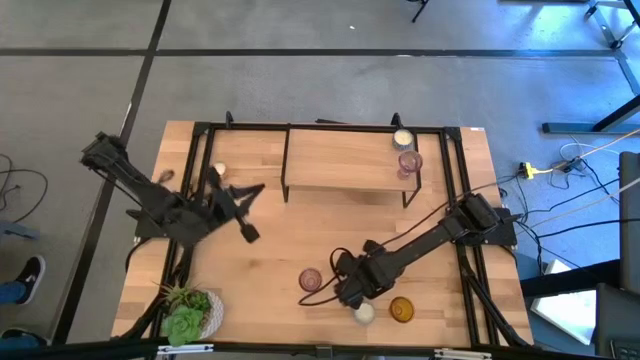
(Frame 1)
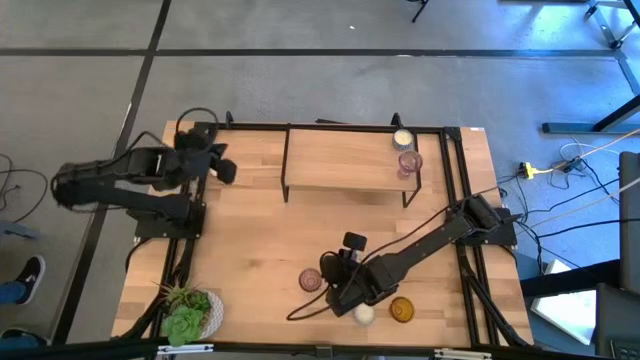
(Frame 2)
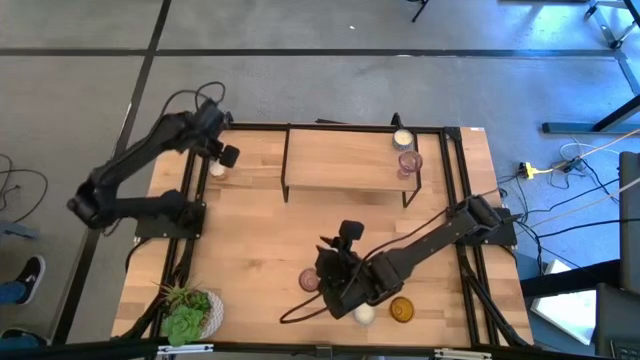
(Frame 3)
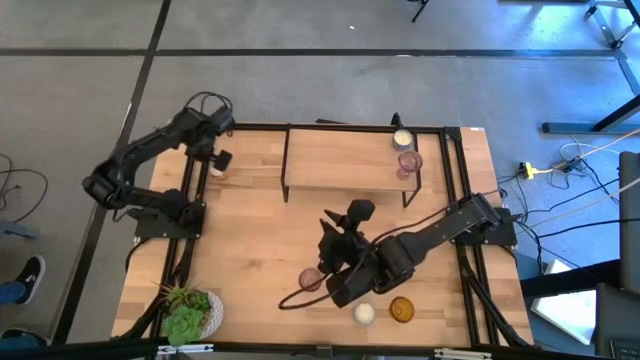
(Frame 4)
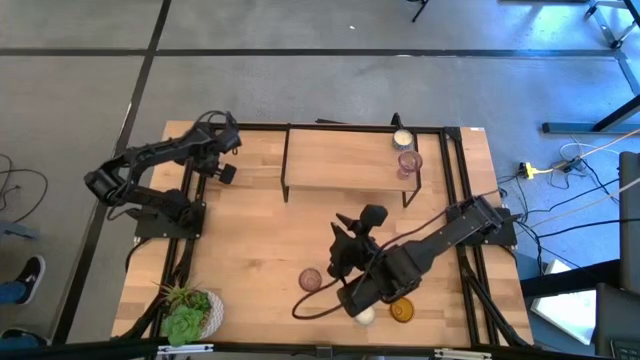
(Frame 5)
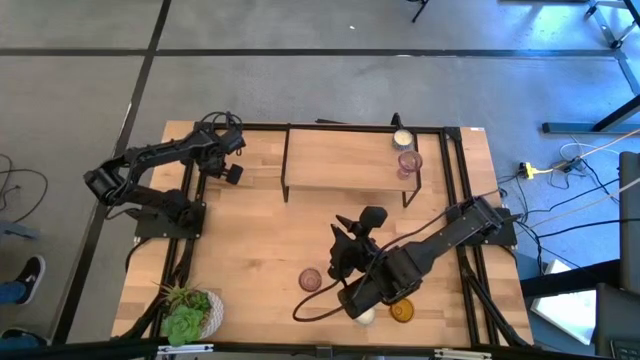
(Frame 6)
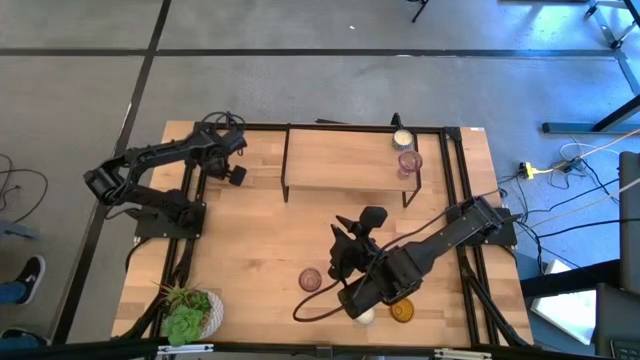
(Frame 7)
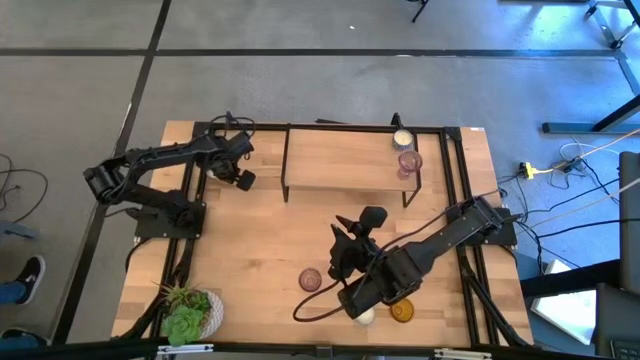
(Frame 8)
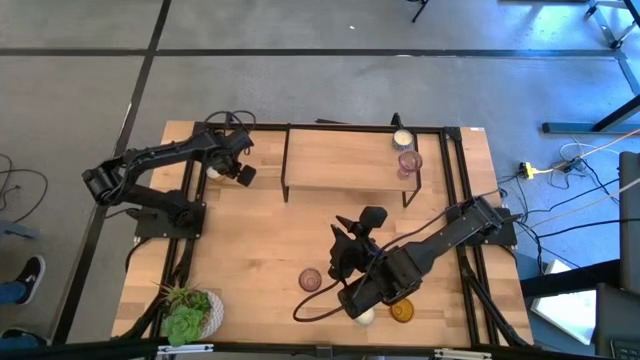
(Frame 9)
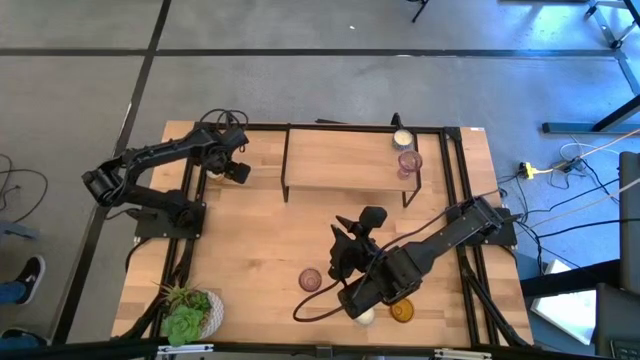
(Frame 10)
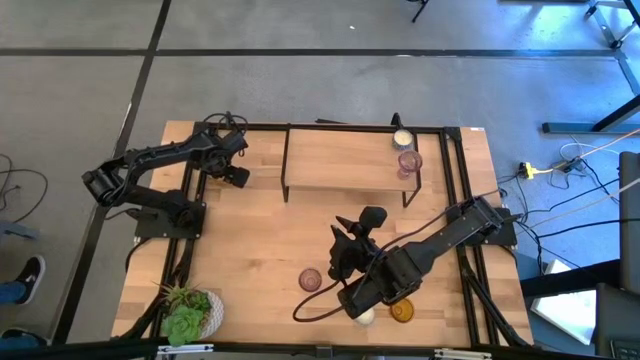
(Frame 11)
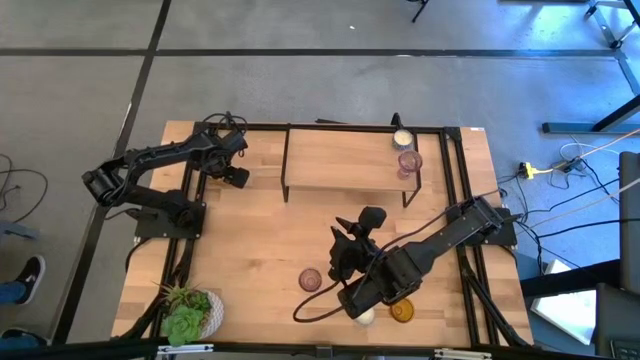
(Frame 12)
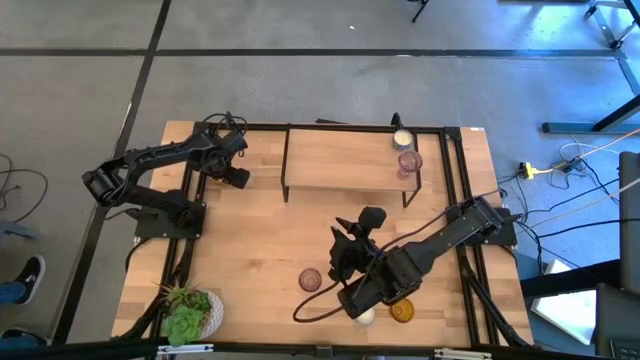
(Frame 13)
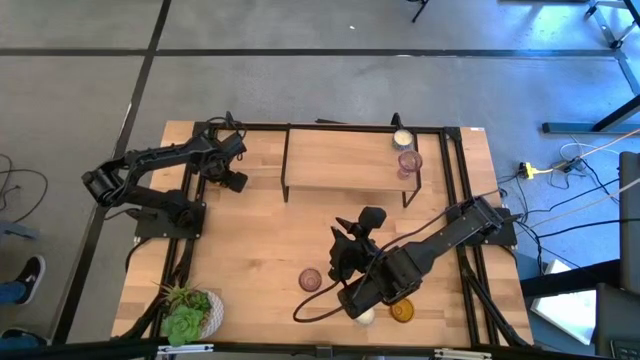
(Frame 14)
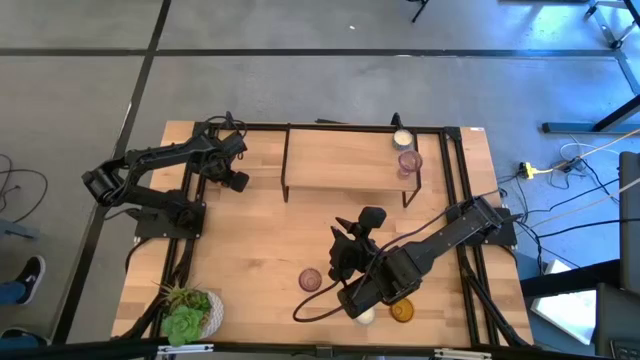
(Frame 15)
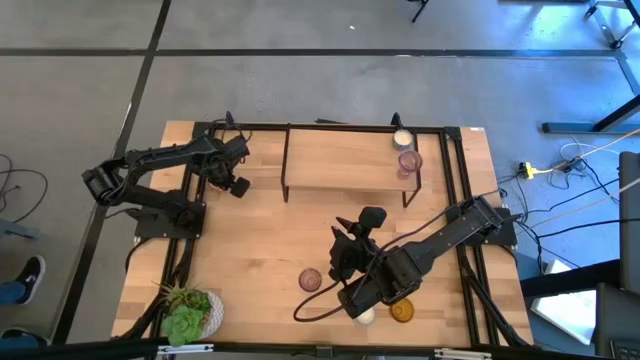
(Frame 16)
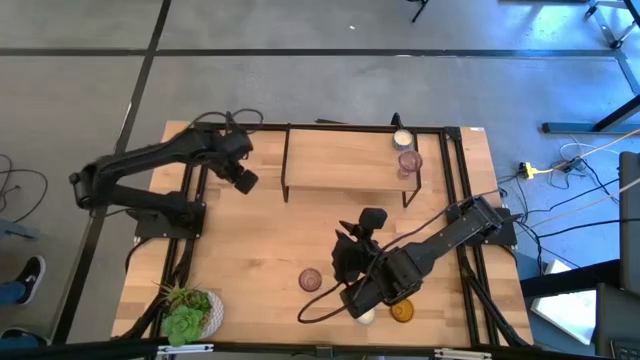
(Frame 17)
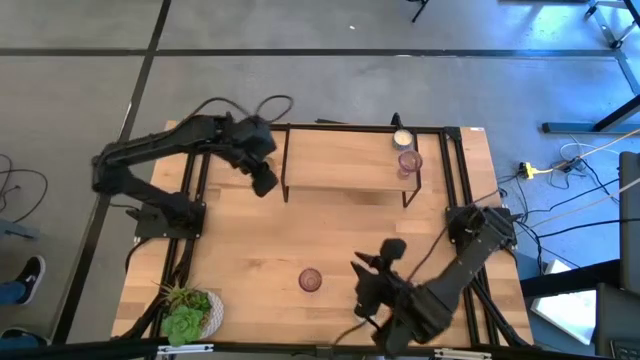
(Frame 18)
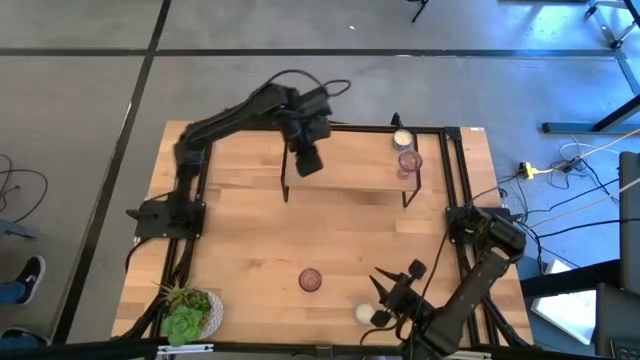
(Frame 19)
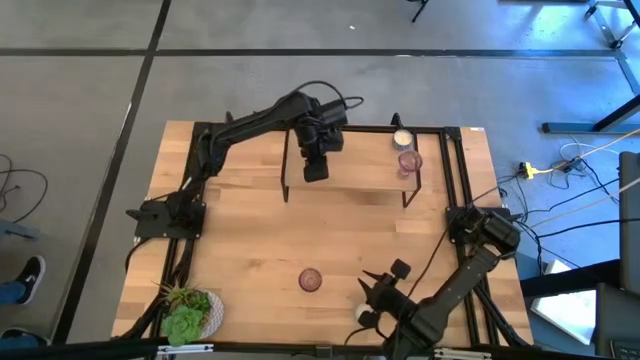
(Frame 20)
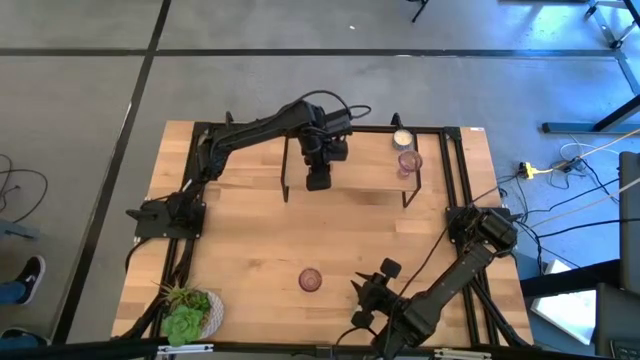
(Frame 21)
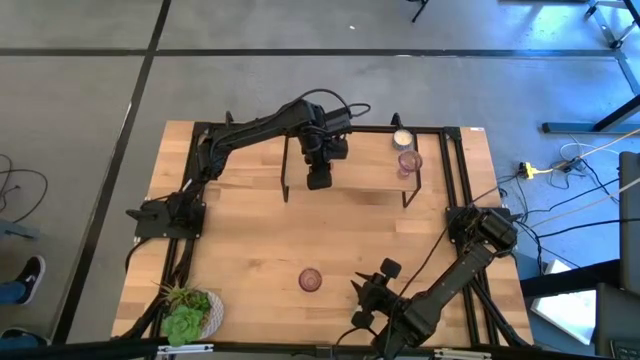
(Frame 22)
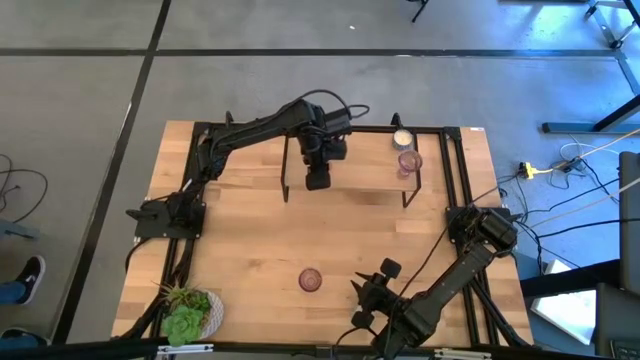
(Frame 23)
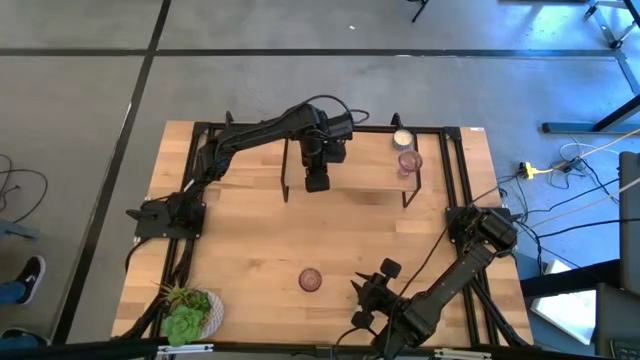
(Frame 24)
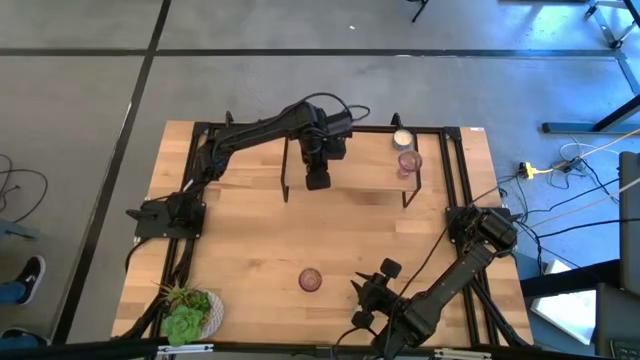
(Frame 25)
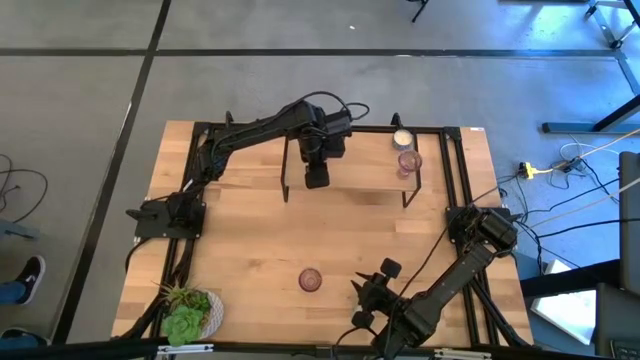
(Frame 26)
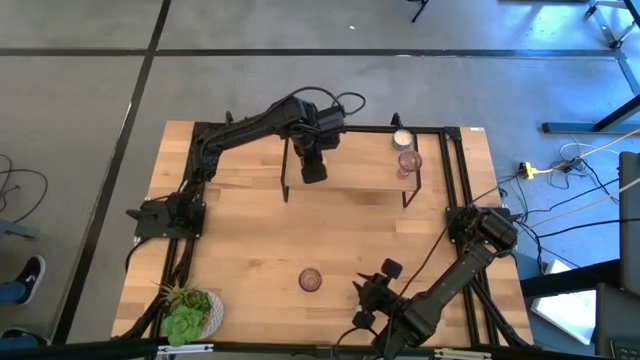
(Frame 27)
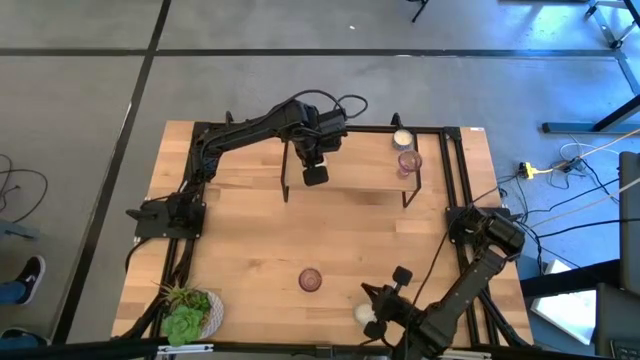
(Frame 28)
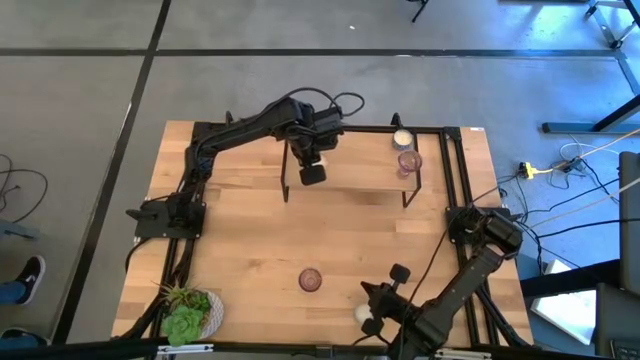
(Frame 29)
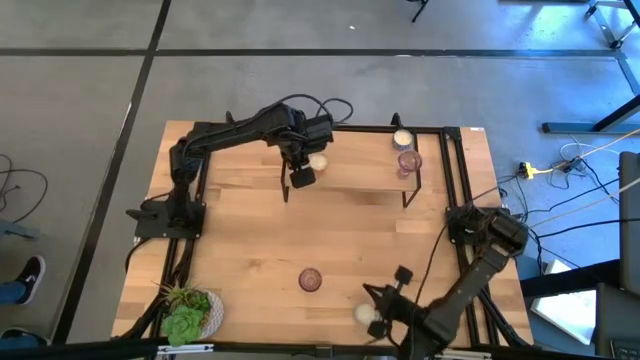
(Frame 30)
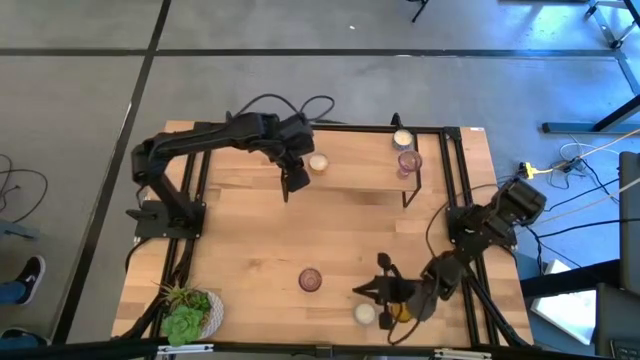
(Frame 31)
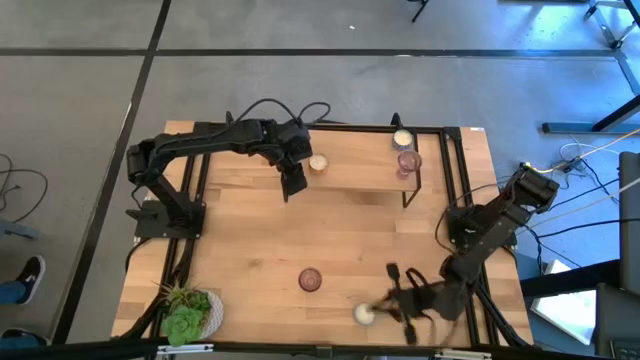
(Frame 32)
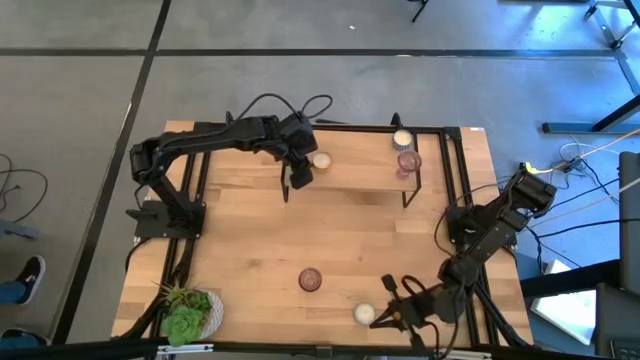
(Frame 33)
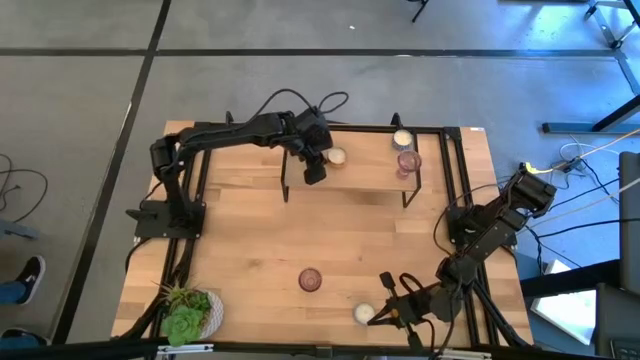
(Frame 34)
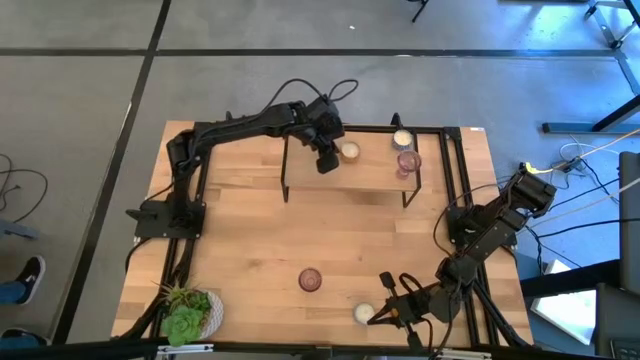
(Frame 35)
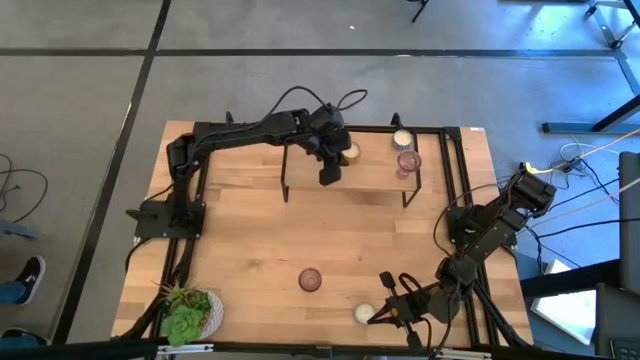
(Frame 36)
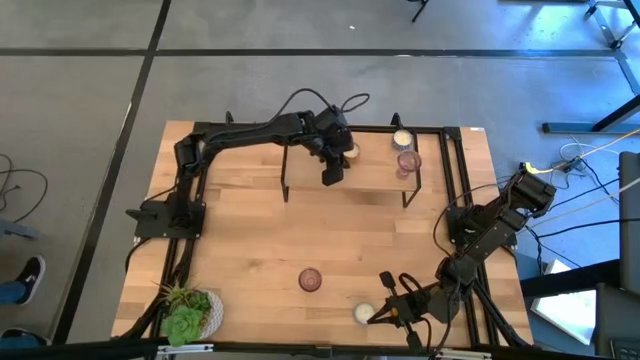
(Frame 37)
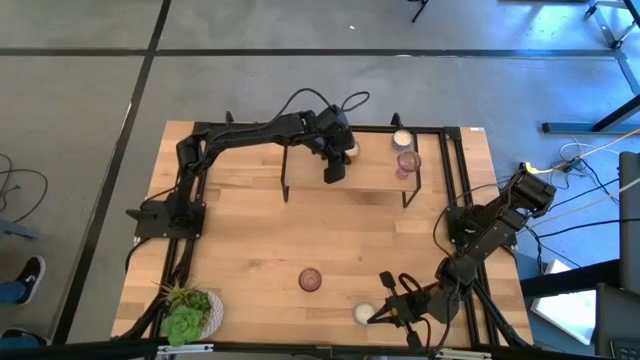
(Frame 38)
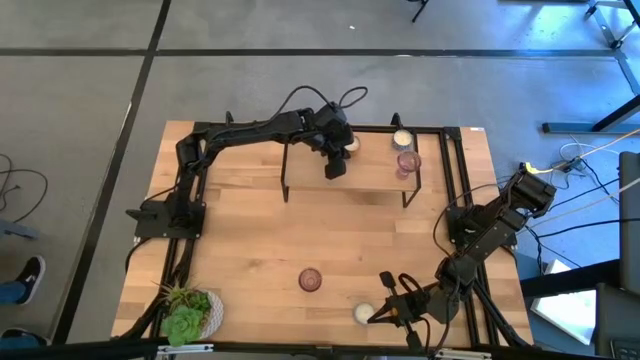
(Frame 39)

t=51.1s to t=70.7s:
Task: Pick & Place candle stick holders
Put the yellow candle on the shelf
